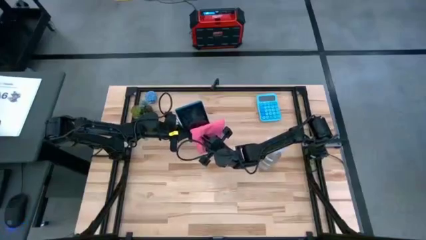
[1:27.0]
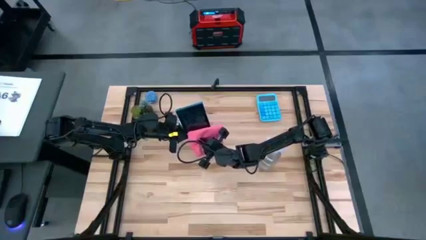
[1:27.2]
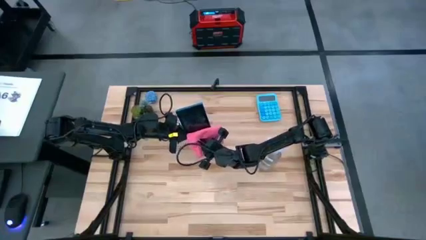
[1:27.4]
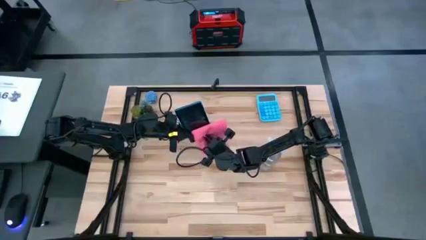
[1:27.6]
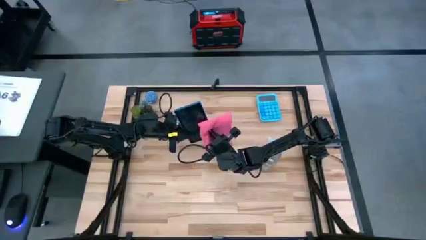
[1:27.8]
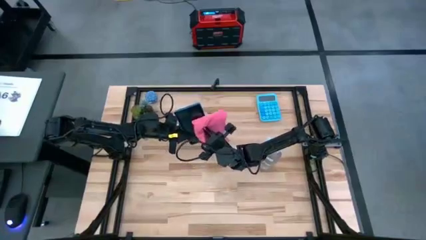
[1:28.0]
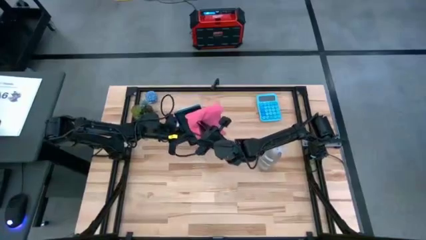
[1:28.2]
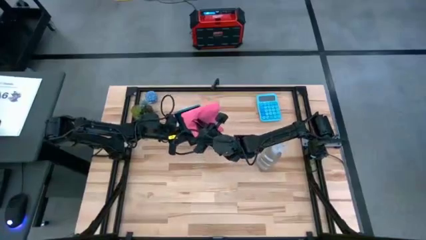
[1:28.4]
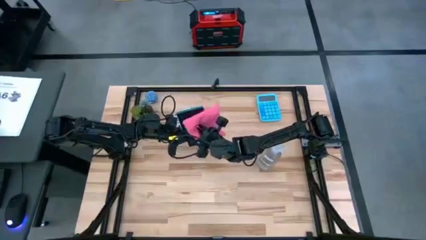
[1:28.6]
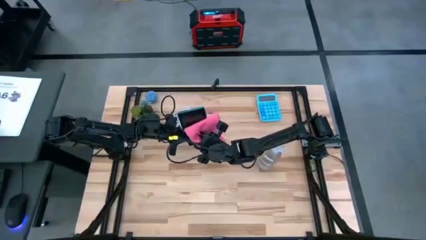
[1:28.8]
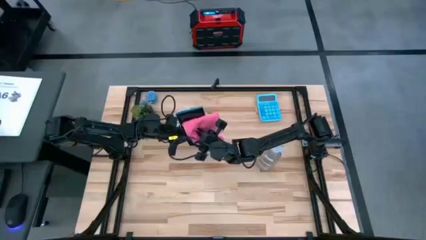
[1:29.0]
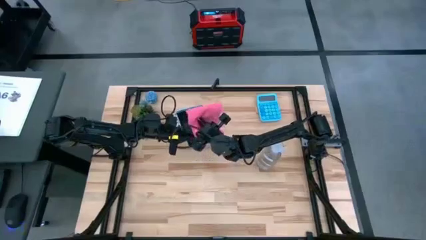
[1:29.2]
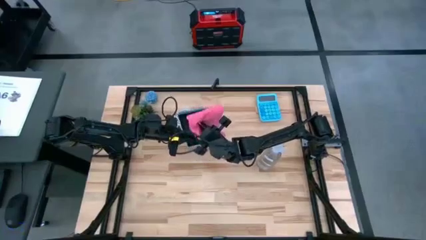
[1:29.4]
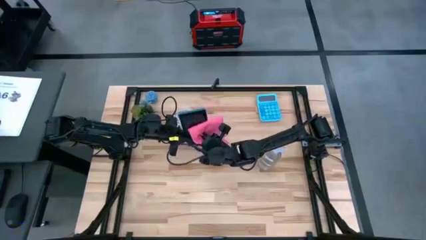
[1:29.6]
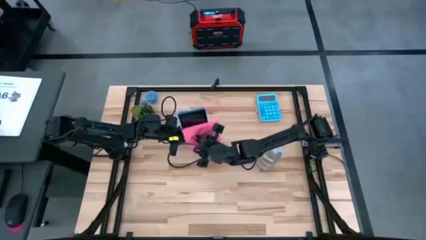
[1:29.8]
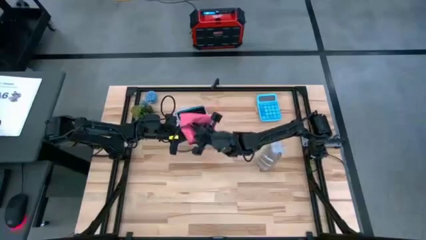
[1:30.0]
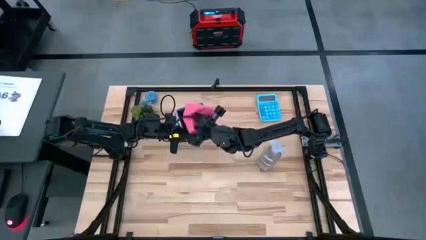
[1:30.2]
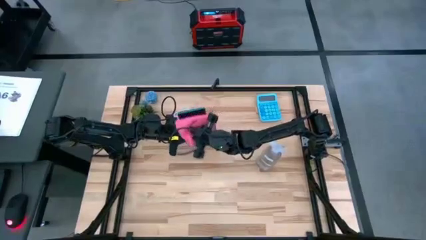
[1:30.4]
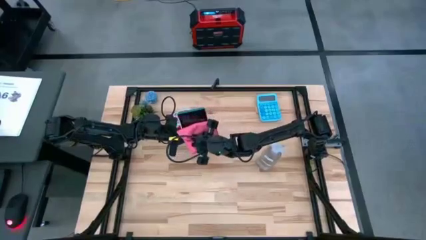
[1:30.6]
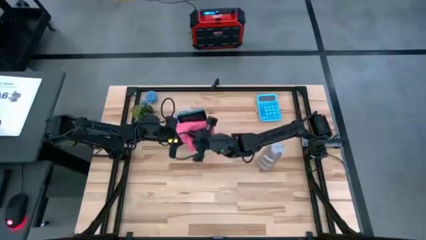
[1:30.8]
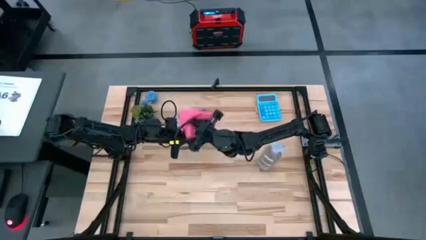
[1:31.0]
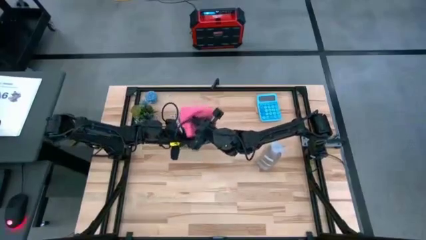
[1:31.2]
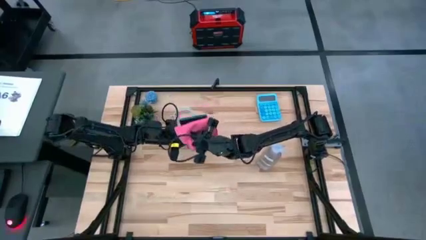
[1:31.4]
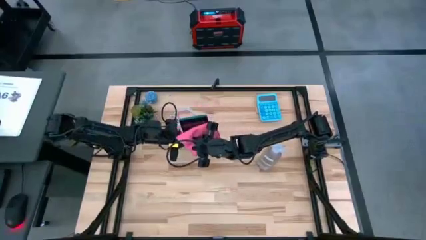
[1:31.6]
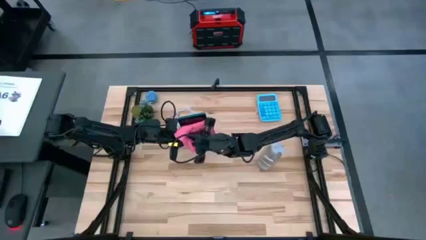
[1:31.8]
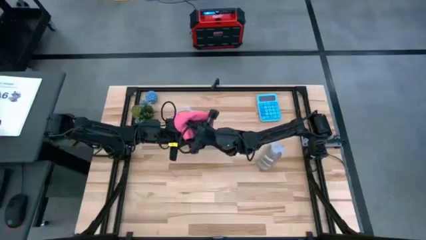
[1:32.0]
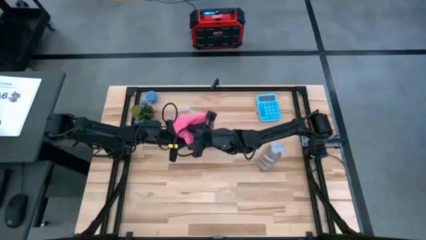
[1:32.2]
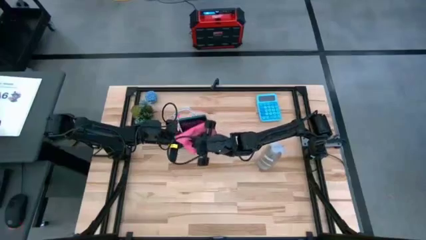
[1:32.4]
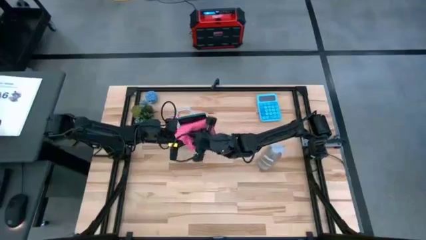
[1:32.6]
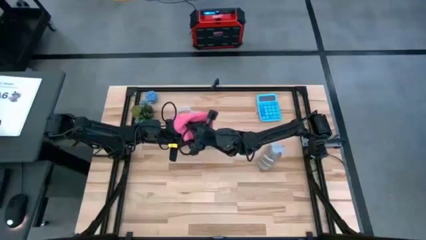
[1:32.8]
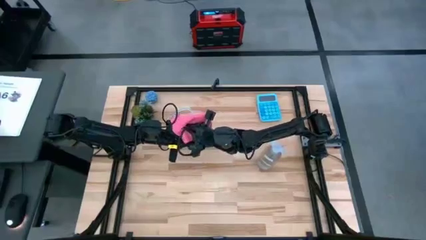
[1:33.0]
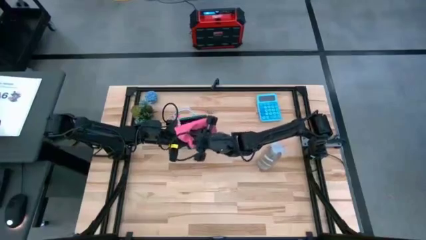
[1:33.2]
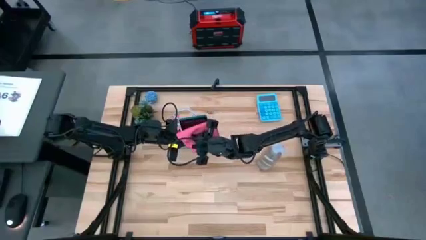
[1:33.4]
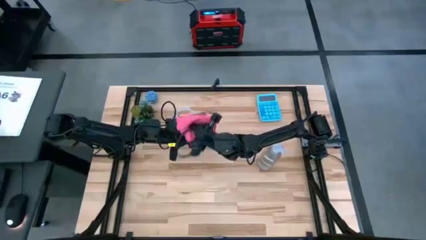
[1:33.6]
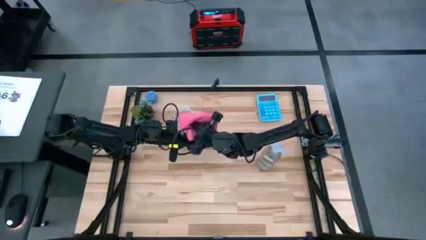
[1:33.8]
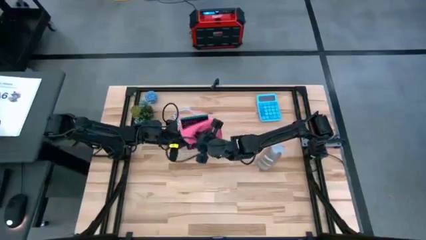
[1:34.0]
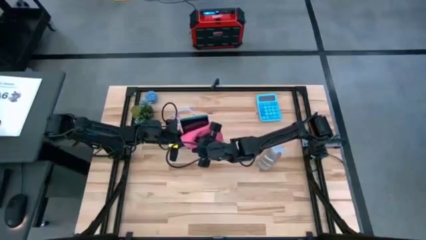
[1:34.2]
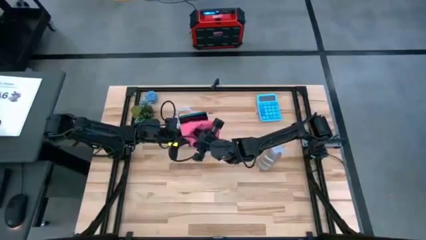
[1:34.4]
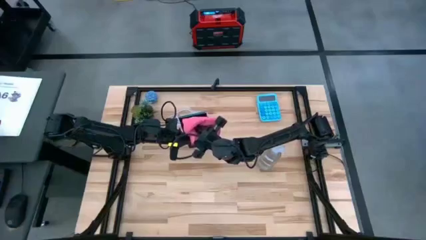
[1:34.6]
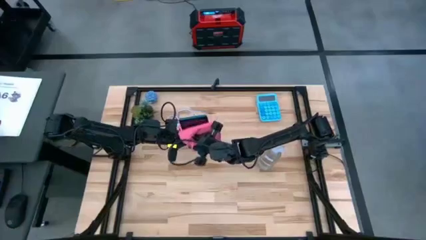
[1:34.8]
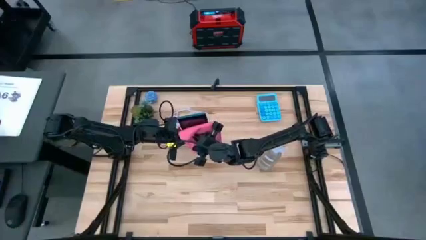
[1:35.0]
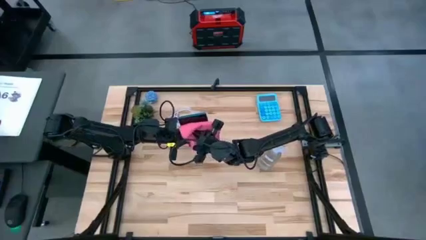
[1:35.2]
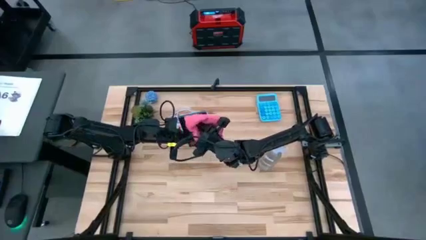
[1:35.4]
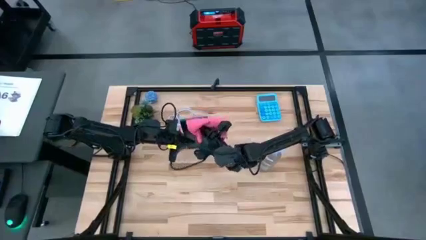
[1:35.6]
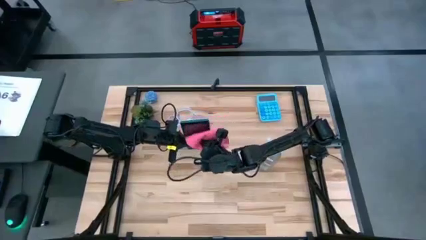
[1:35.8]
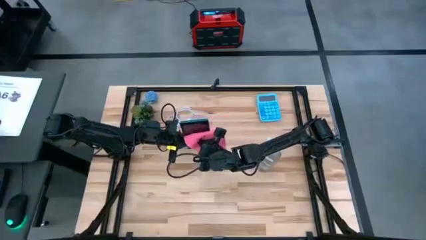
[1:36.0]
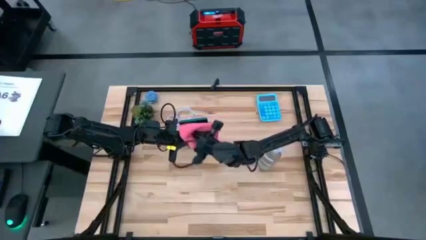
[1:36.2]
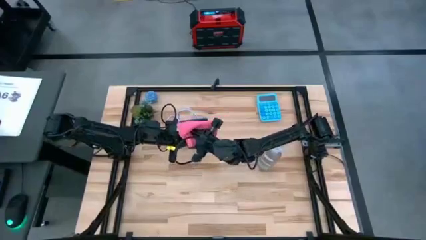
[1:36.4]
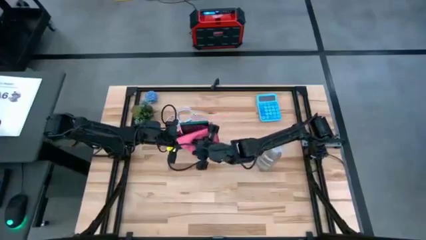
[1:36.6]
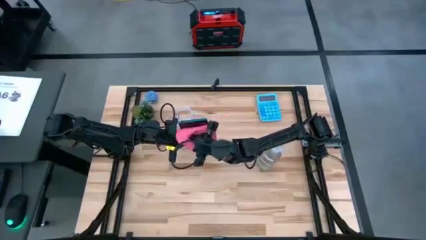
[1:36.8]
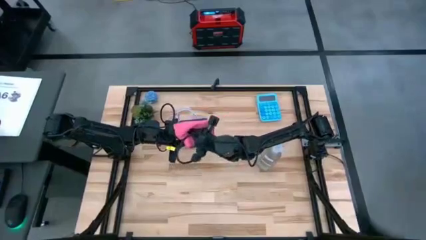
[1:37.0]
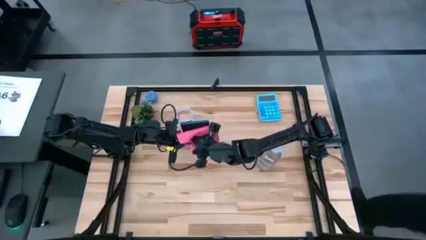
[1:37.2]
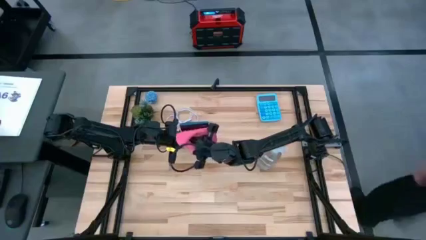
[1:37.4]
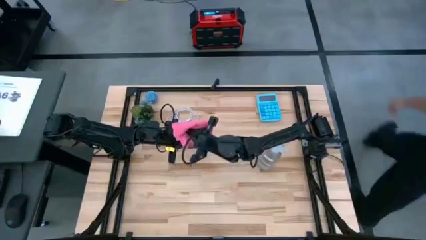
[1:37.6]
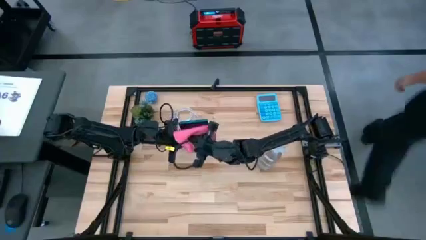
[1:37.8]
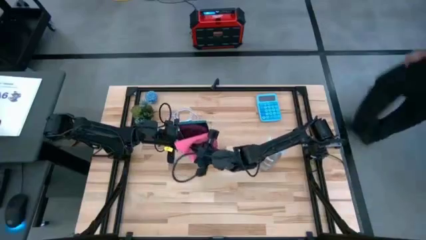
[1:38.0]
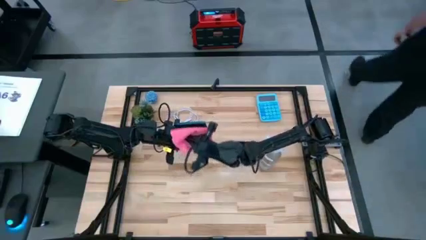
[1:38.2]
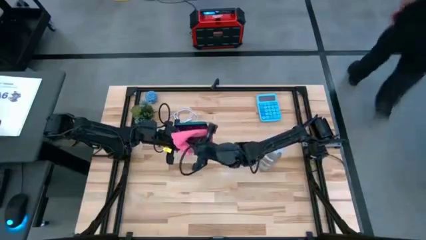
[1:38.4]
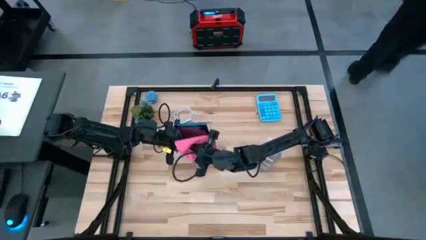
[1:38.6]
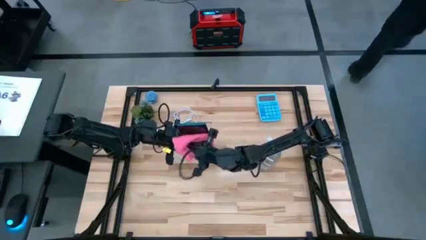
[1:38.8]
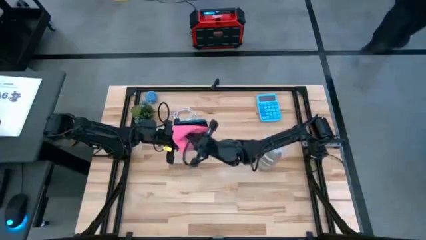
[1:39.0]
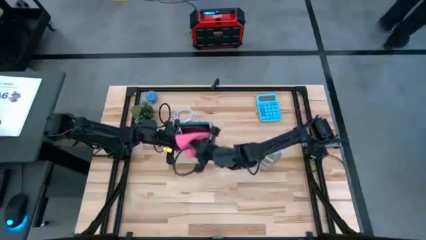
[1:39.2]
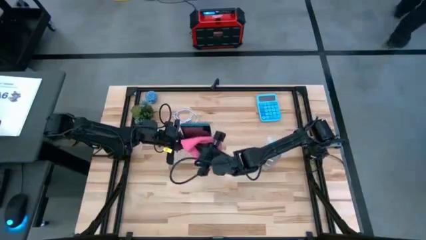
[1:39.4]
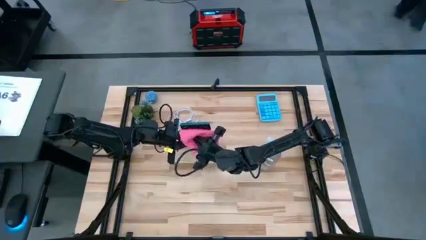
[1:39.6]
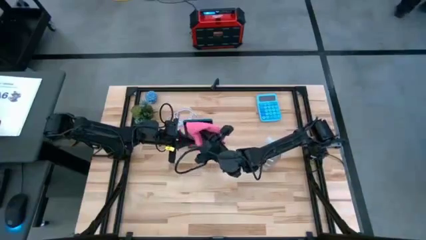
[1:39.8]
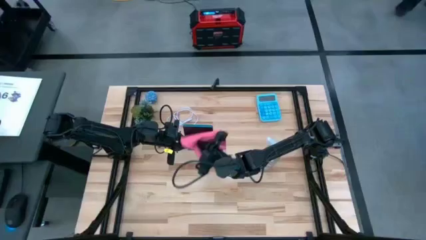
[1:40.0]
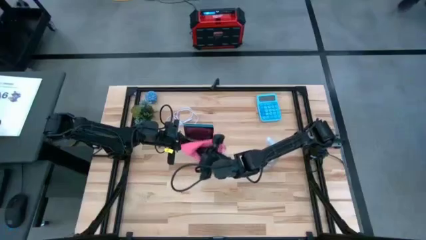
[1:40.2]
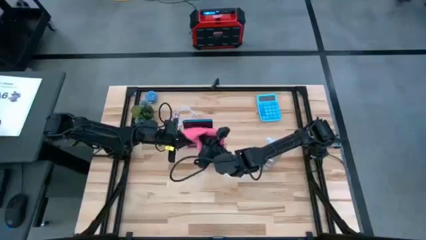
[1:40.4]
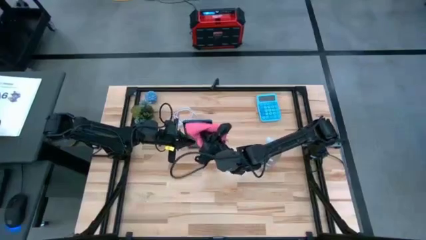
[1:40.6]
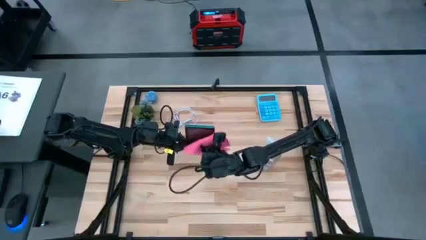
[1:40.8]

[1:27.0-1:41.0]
Task: Apply microfiber cloth
Wipe the front of the cellphone with the pink microfiber cloth
